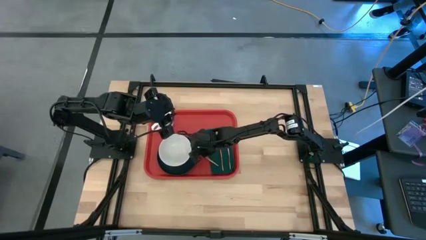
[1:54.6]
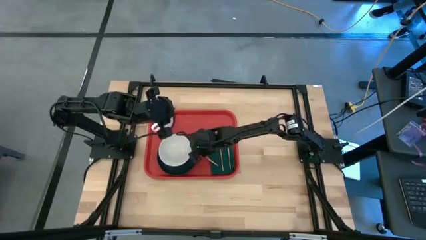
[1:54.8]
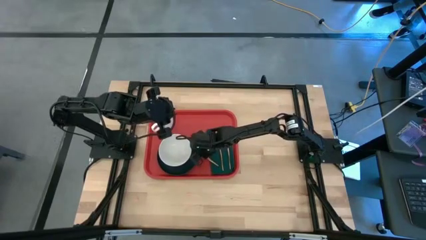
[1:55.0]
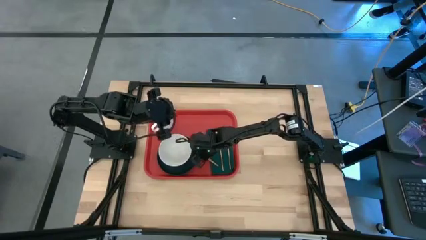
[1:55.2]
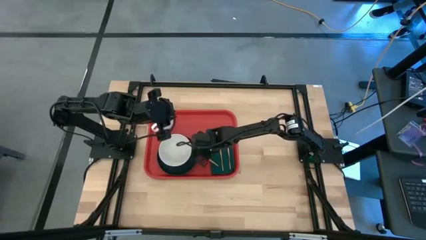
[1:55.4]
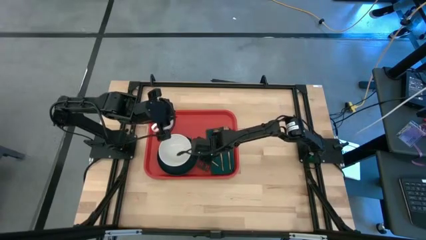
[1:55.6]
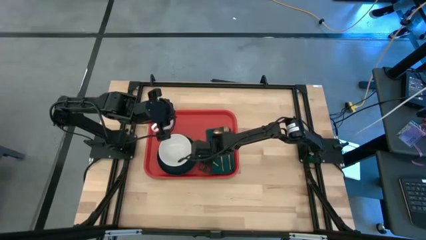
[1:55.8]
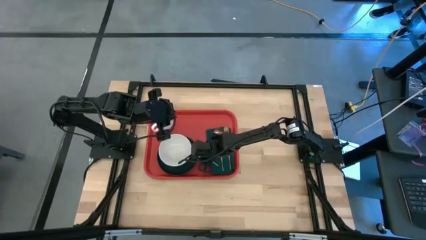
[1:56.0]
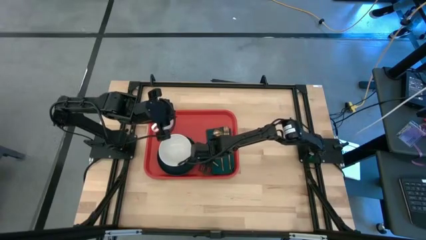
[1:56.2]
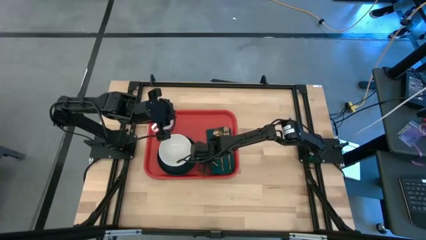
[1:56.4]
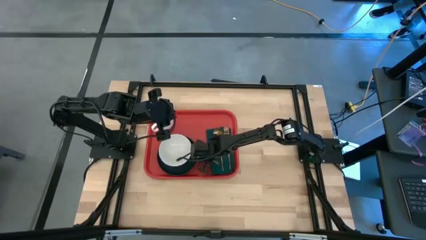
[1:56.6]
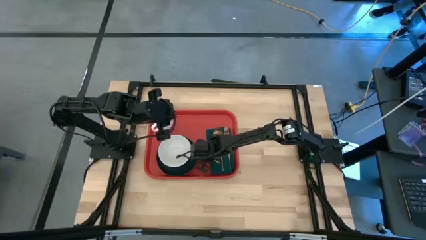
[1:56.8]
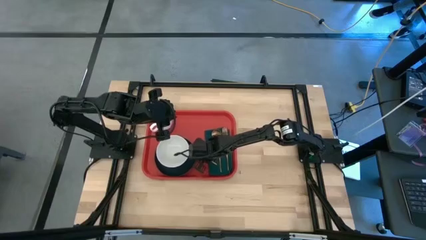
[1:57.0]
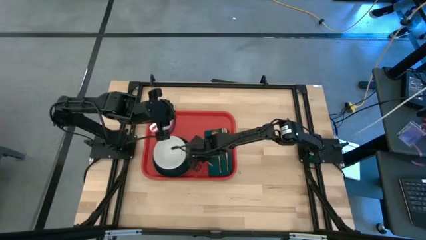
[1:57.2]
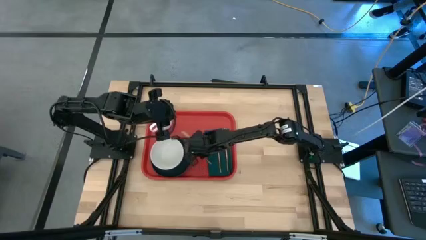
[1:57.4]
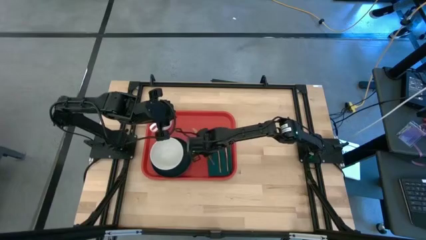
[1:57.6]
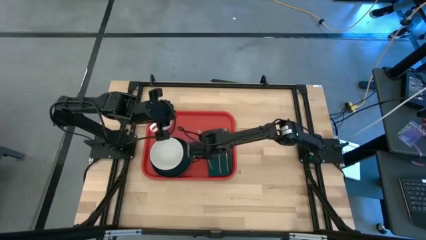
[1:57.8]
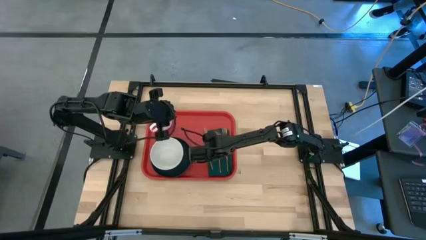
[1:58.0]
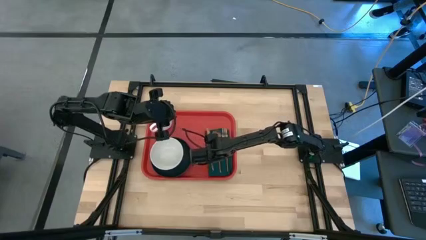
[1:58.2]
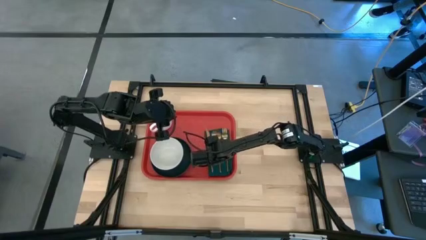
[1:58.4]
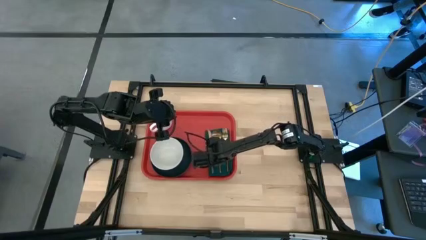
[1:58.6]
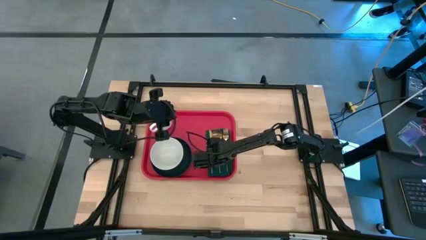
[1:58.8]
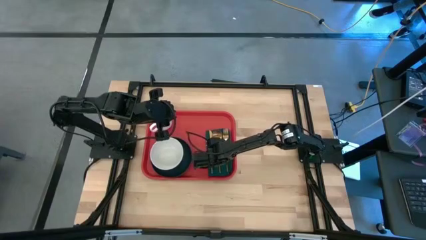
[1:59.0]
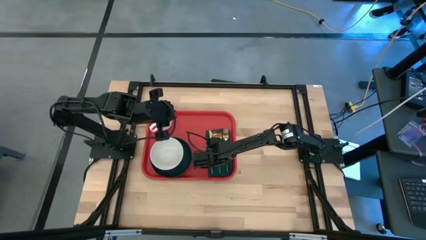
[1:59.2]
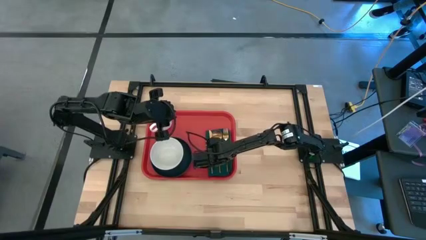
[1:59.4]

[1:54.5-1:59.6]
Task: Set up tray
Put the gold knife to the left of the gold spoon on the green napkin on the red tray

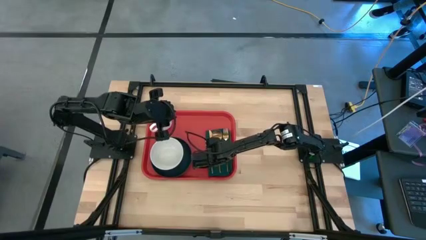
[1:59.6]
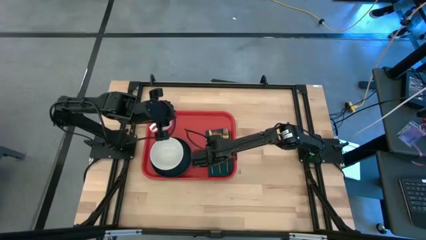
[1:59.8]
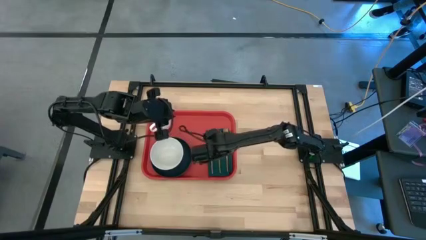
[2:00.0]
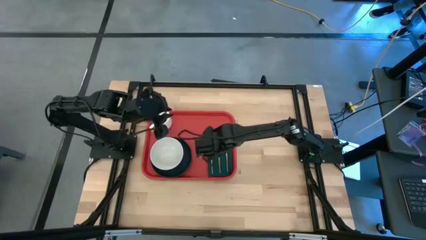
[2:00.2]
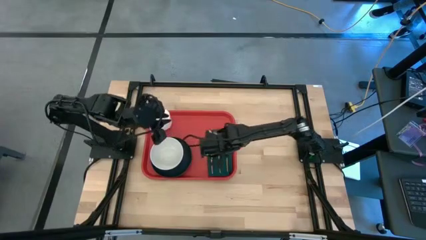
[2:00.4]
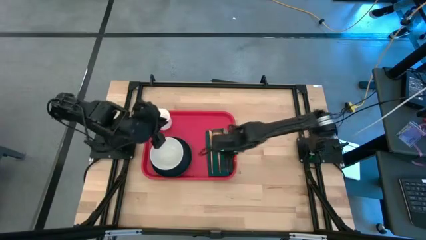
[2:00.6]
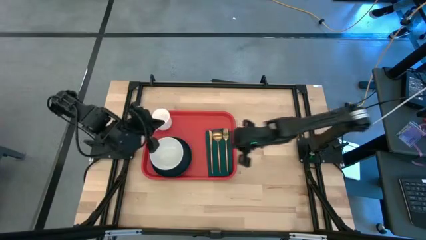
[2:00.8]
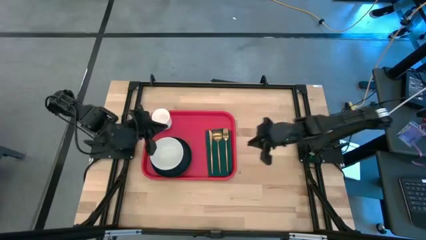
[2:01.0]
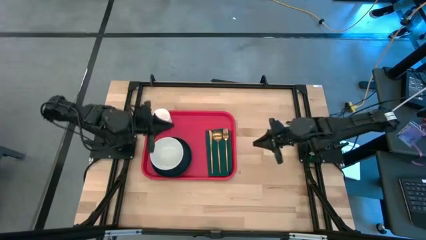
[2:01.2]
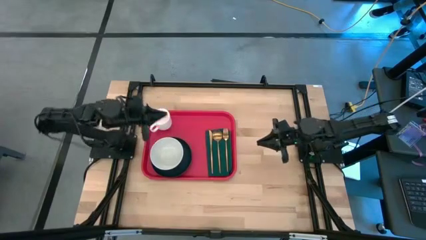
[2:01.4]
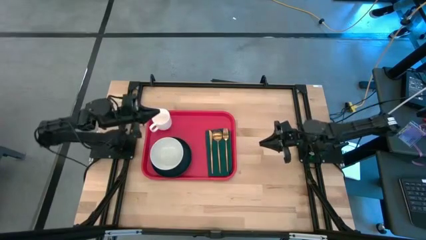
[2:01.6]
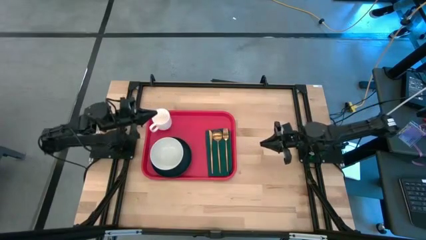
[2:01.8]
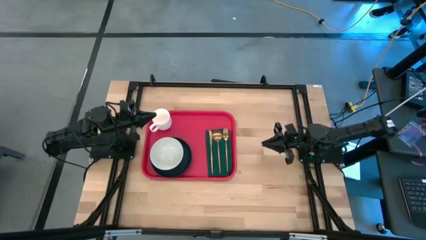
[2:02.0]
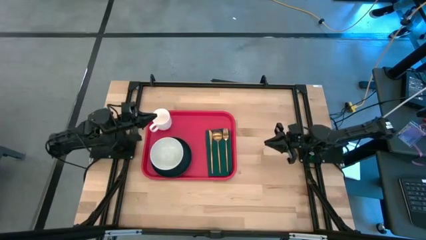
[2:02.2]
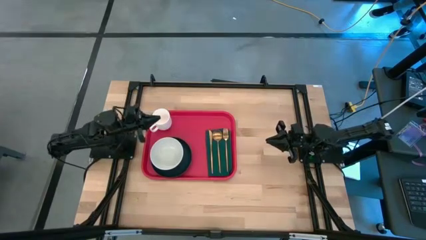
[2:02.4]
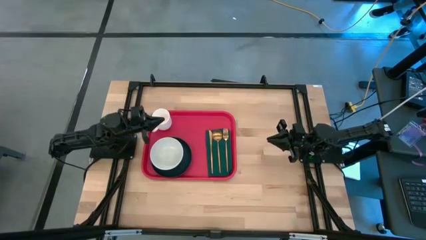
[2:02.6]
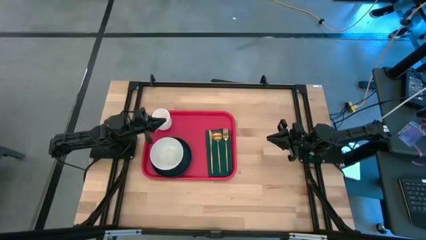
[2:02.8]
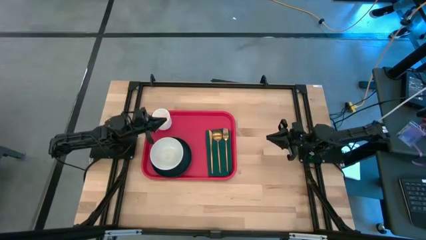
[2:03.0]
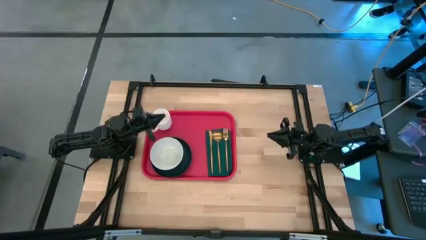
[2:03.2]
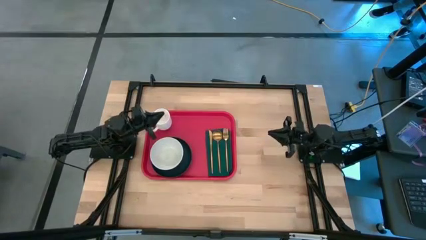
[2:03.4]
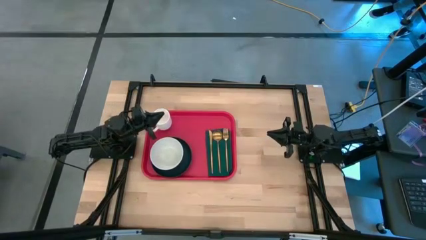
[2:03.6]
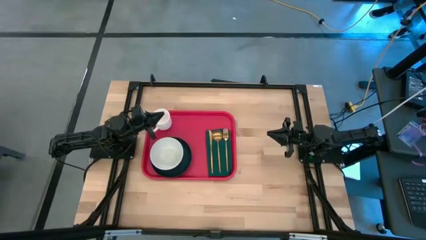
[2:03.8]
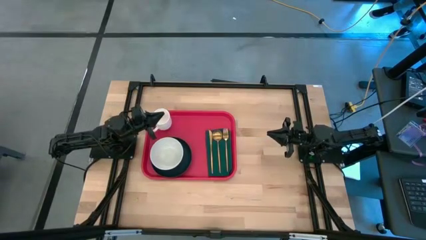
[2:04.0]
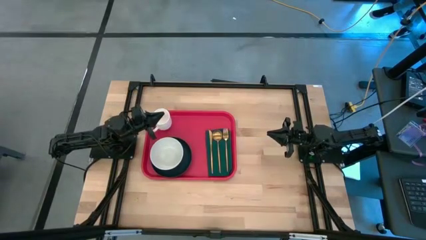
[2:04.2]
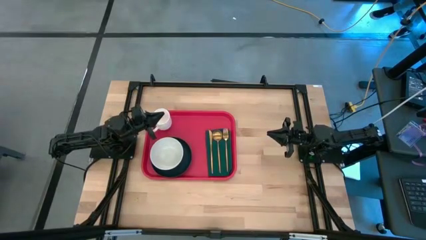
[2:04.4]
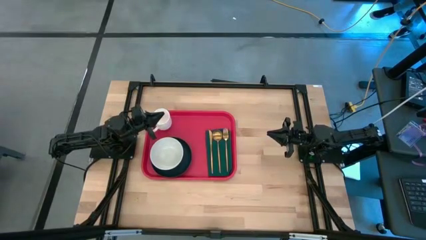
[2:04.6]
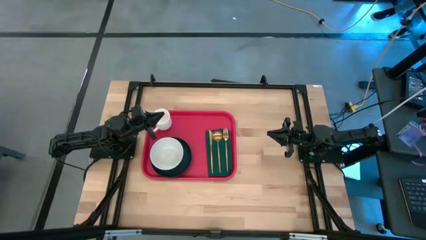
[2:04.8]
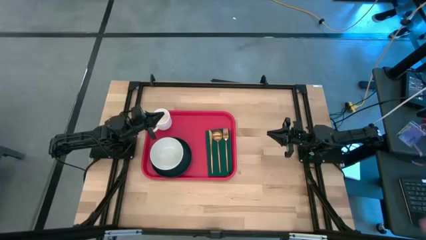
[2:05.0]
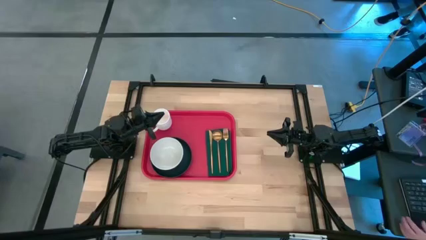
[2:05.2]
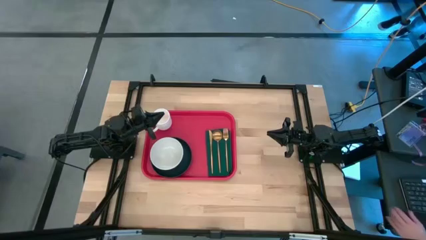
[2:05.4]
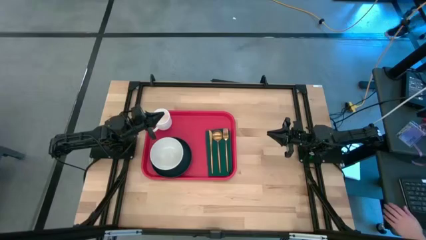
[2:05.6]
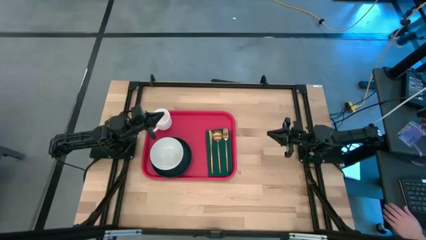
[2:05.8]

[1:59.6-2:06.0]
Return to Home Position

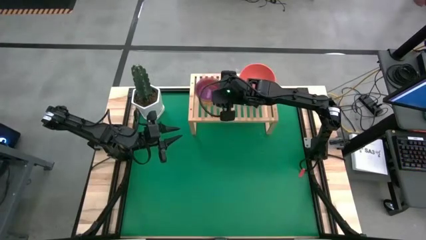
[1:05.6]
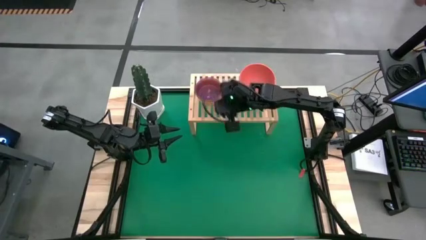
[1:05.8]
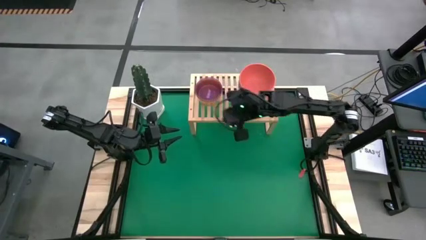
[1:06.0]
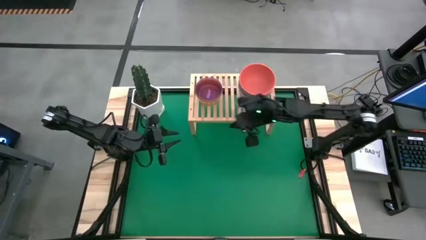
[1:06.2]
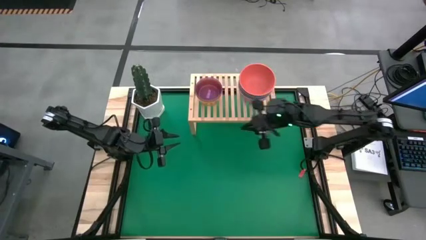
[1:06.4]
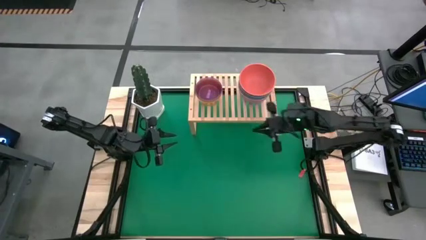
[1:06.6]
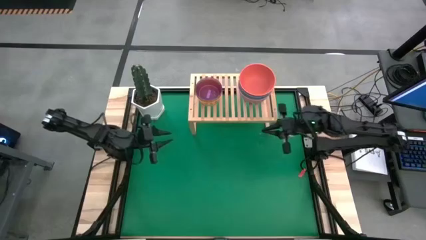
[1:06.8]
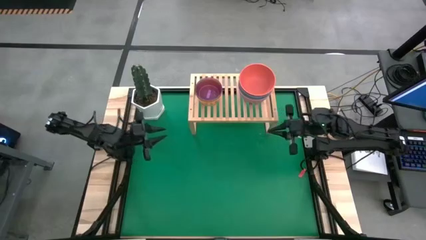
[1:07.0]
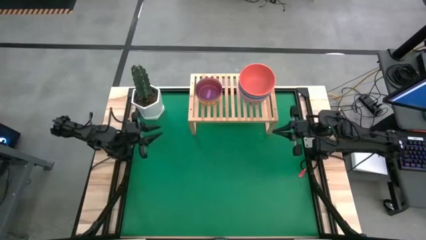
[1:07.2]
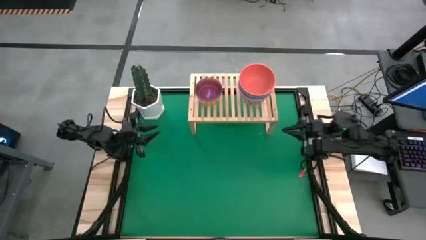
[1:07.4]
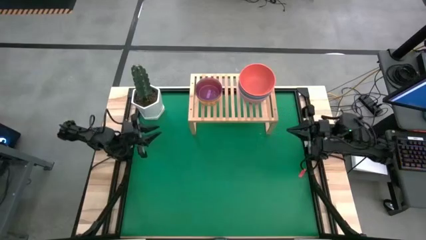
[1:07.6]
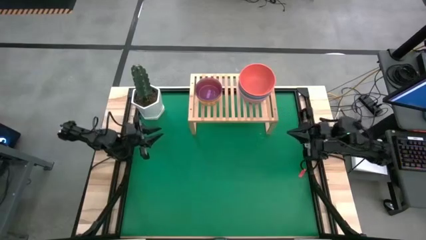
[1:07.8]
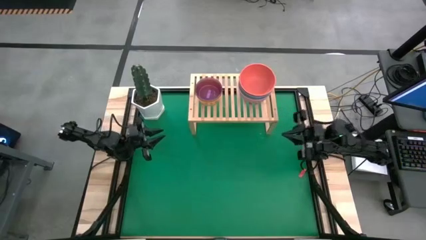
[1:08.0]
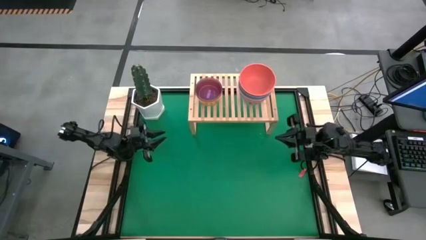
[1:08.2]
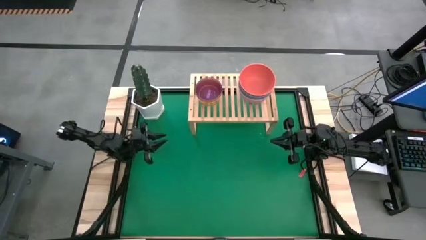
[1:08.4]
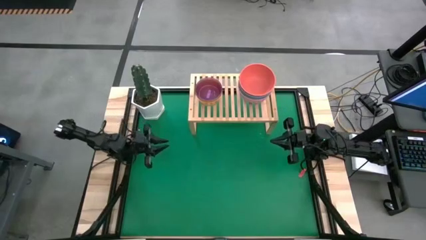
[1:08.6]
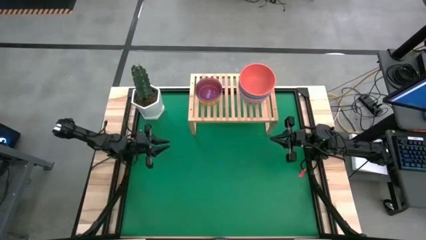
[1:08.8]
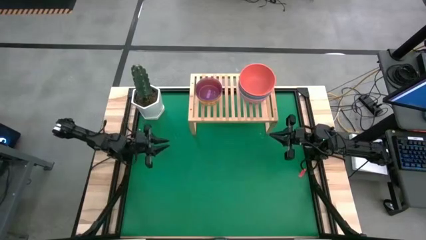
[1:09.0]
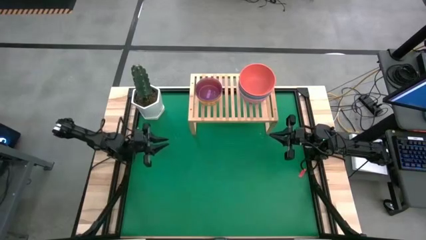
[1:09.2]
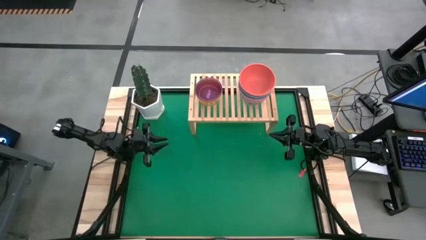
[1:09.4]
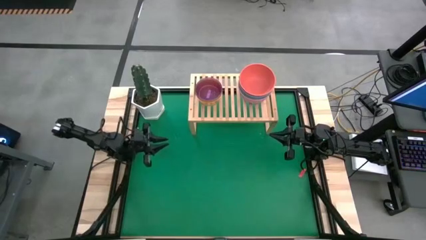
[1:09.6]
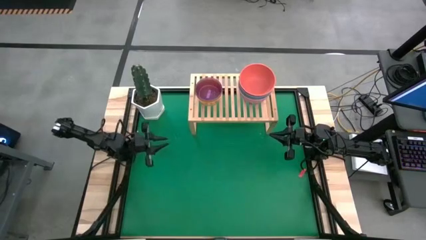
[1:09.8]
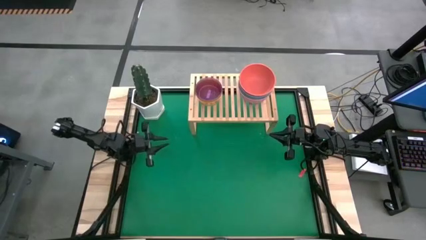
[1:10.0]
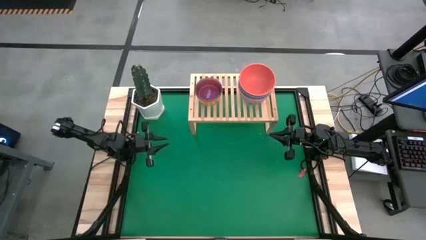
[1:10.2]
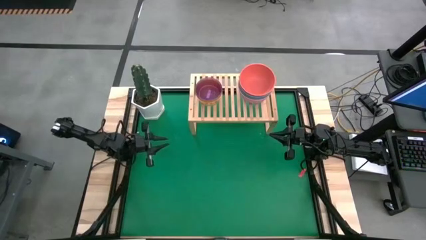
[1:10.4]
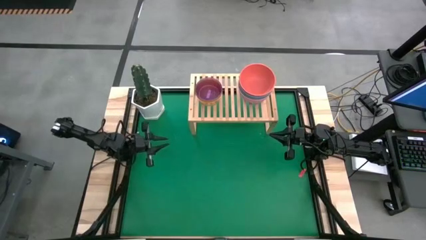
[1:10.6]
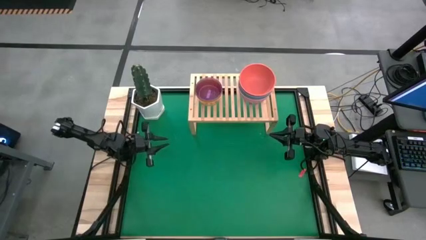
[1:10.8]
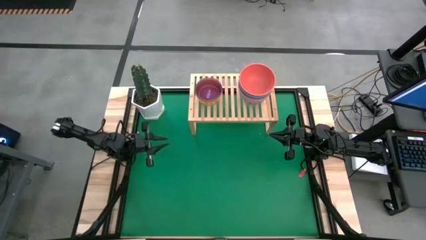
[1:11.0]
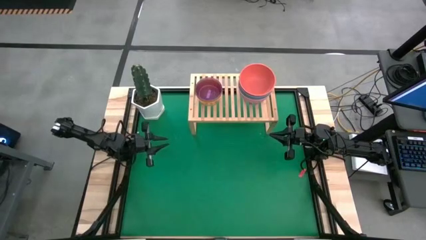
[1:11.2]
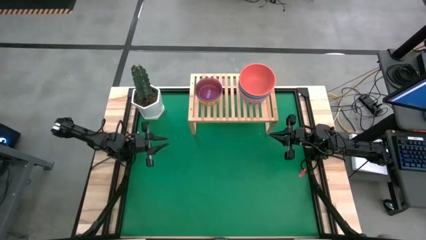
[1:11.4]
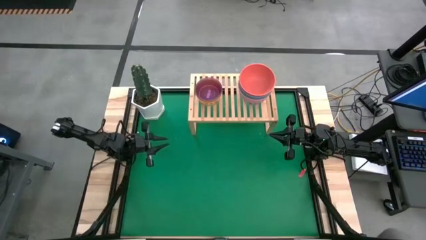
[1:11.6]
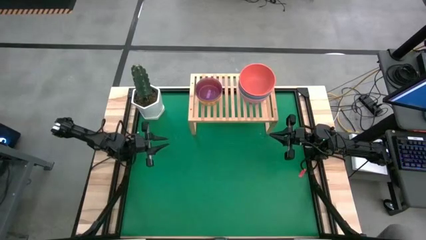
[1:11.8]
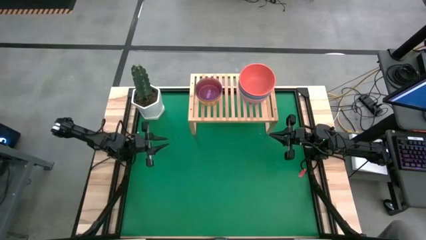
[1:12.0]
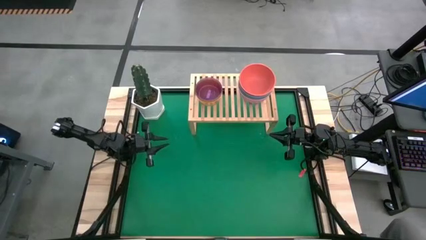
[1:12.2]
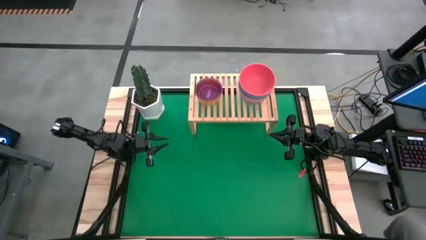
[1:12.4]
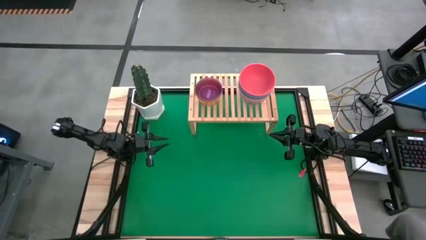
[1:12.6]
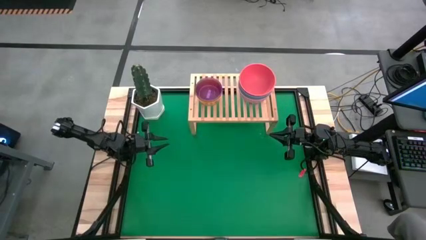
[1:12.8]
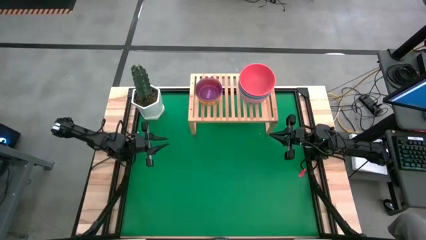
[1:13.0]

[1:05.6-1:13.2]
Task: Place and stack bowls onto a shelf
Return to Home Position
